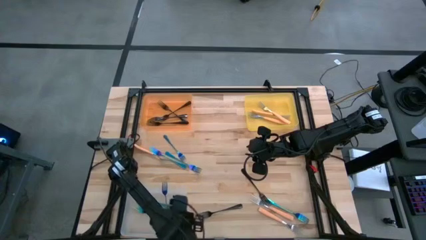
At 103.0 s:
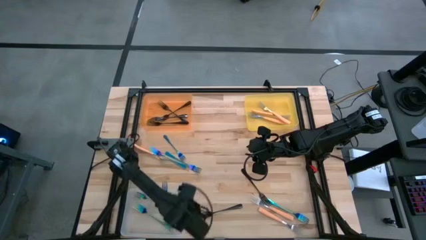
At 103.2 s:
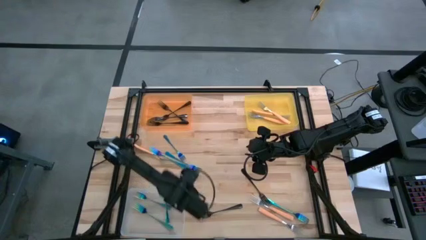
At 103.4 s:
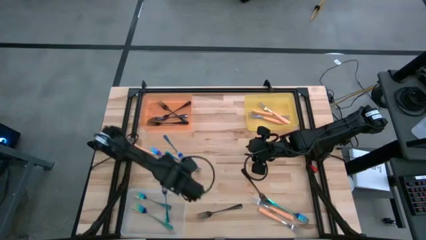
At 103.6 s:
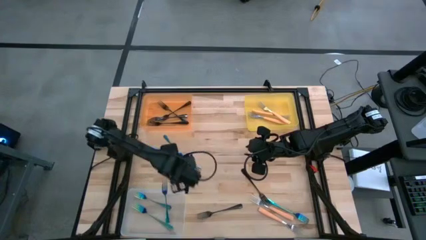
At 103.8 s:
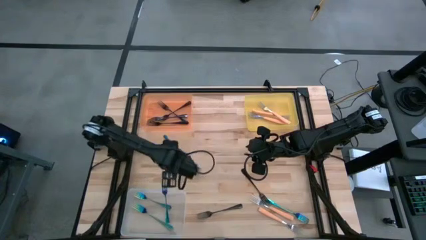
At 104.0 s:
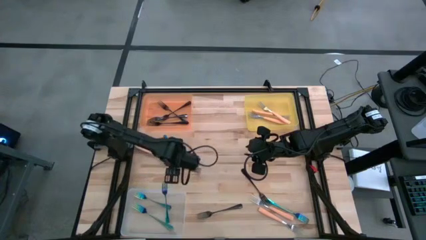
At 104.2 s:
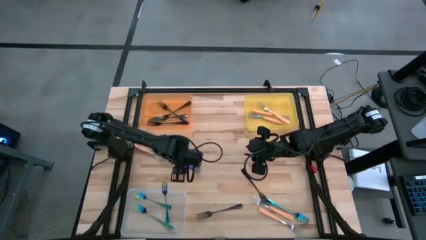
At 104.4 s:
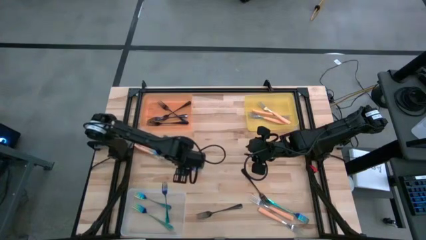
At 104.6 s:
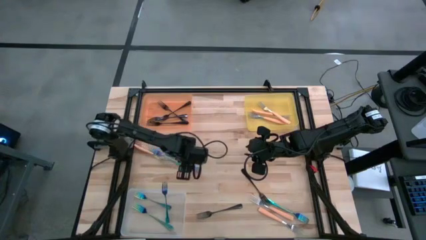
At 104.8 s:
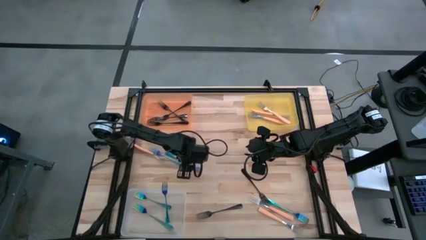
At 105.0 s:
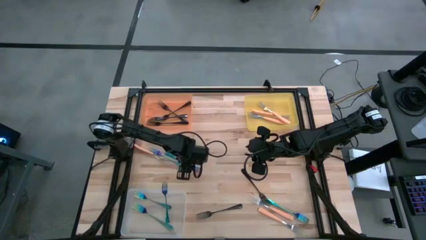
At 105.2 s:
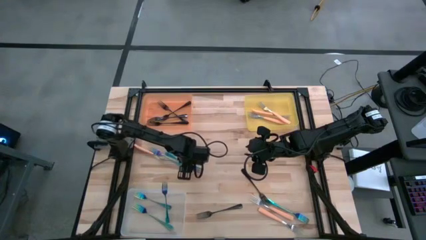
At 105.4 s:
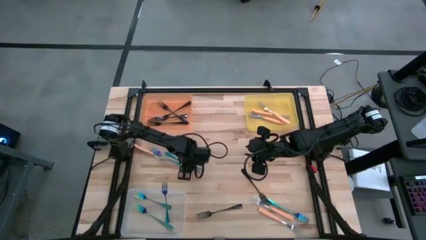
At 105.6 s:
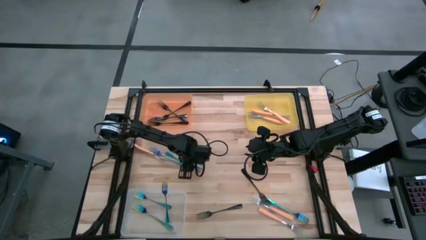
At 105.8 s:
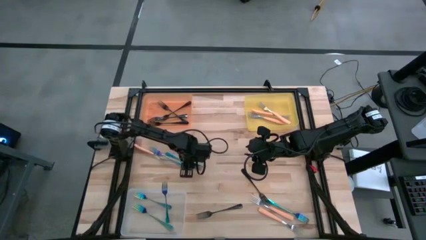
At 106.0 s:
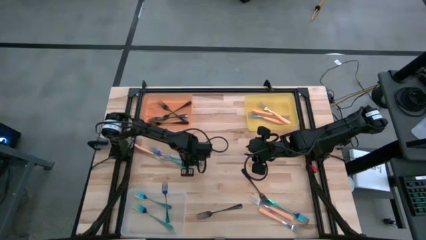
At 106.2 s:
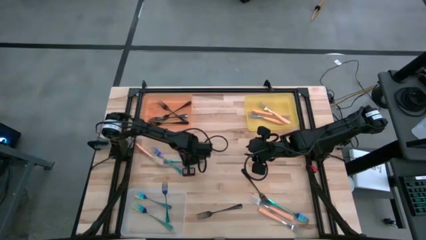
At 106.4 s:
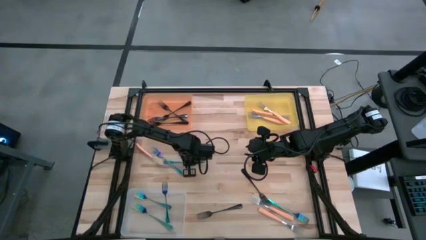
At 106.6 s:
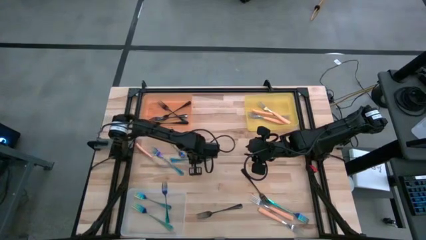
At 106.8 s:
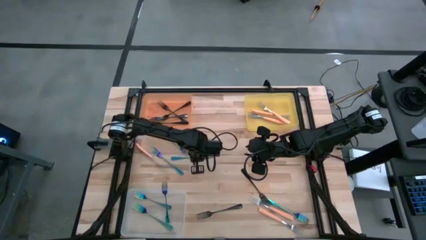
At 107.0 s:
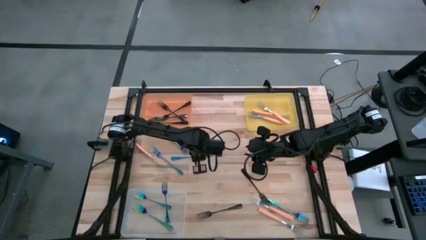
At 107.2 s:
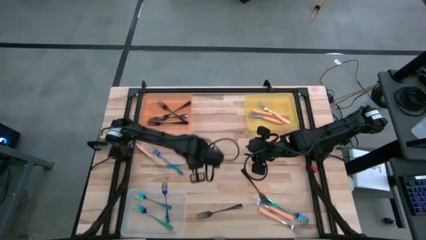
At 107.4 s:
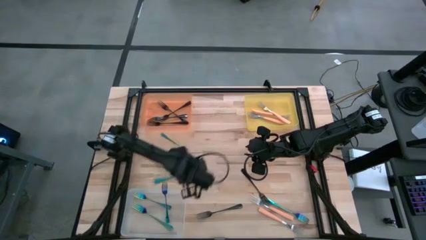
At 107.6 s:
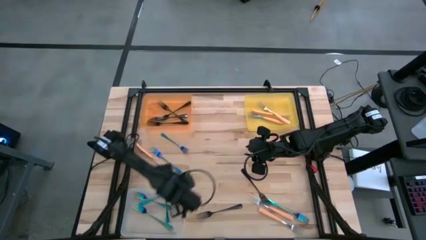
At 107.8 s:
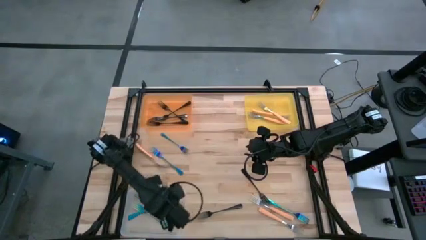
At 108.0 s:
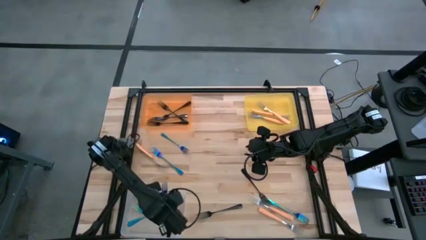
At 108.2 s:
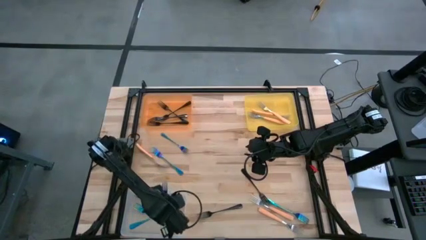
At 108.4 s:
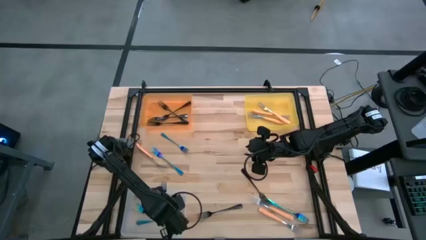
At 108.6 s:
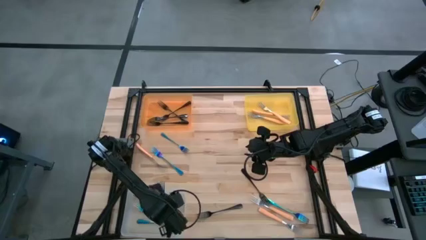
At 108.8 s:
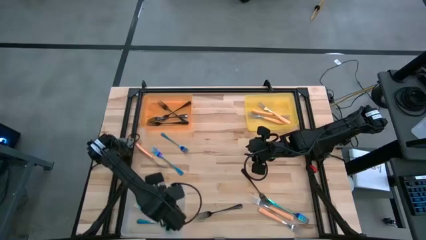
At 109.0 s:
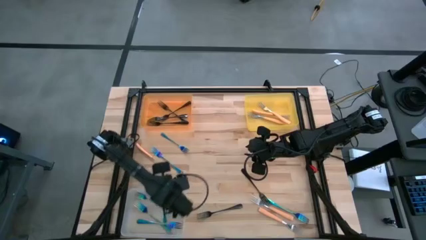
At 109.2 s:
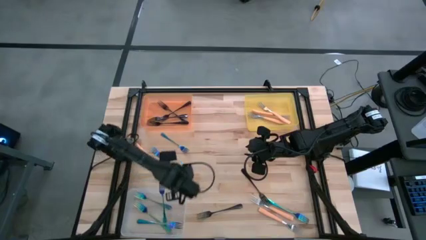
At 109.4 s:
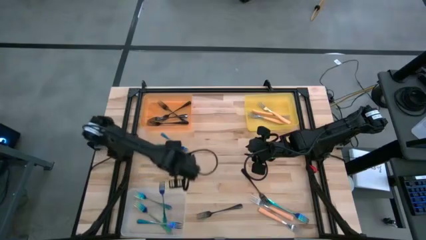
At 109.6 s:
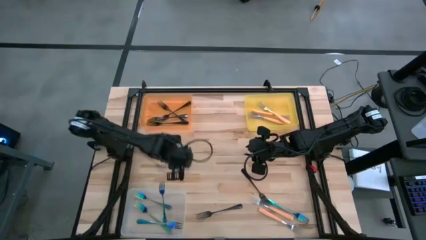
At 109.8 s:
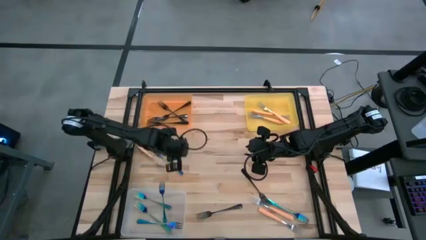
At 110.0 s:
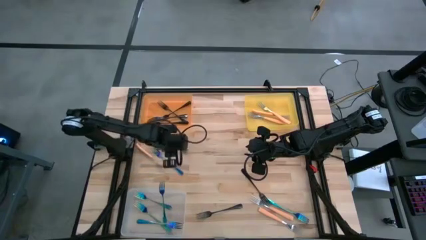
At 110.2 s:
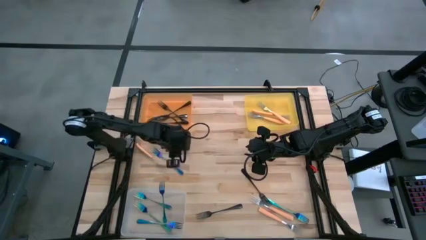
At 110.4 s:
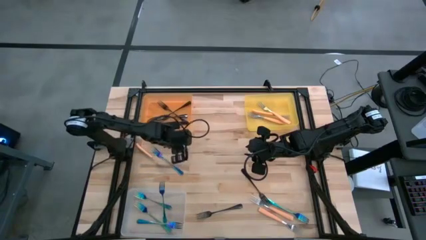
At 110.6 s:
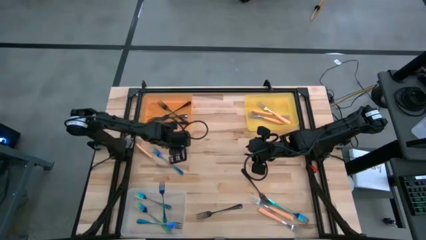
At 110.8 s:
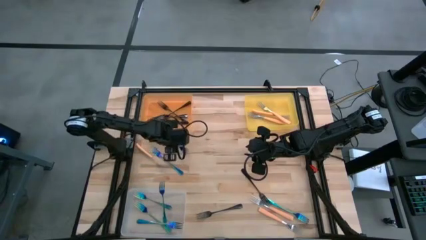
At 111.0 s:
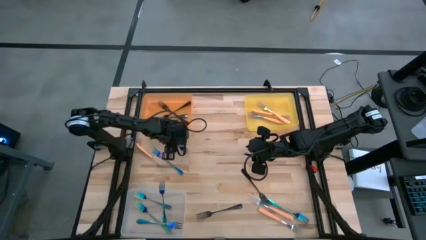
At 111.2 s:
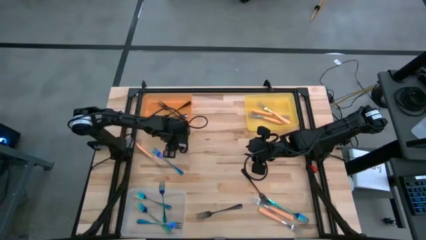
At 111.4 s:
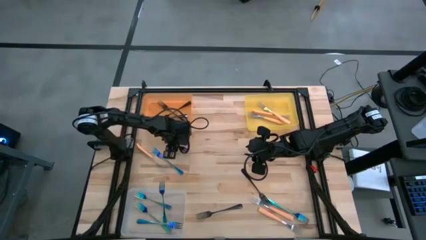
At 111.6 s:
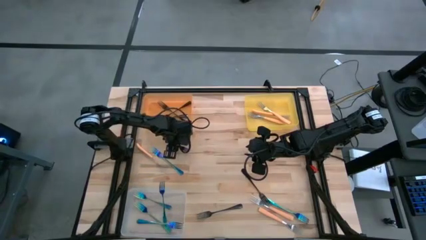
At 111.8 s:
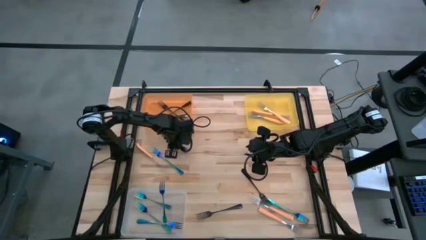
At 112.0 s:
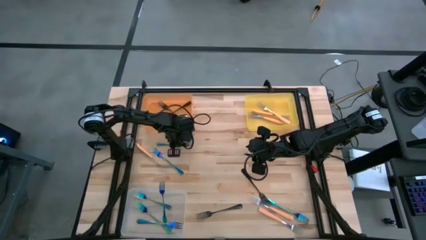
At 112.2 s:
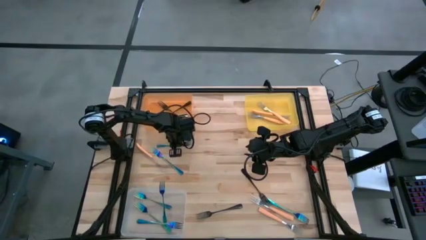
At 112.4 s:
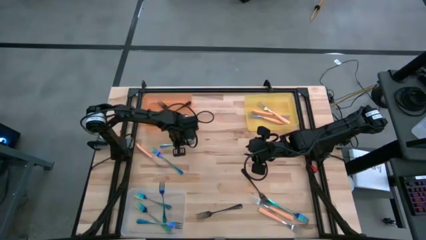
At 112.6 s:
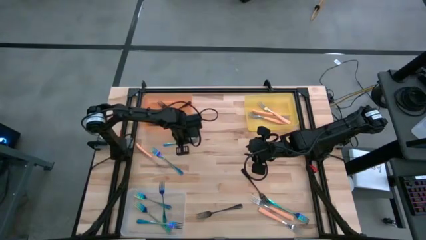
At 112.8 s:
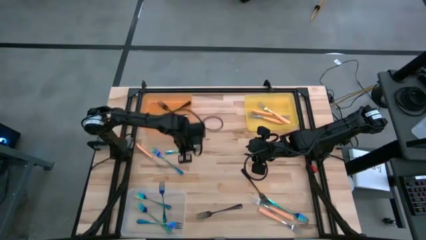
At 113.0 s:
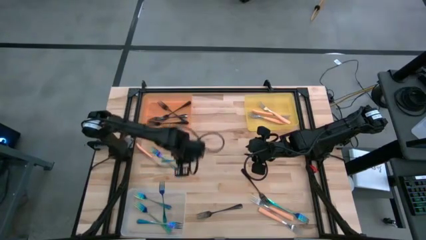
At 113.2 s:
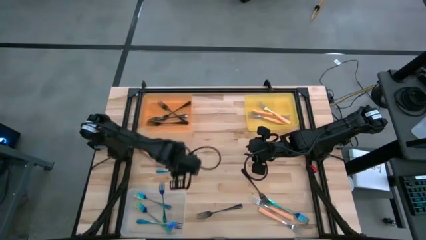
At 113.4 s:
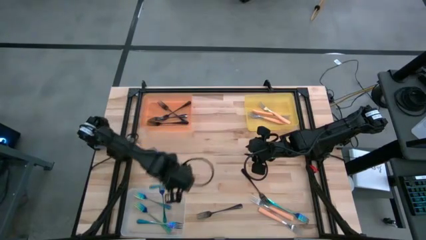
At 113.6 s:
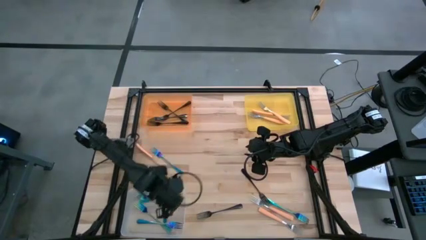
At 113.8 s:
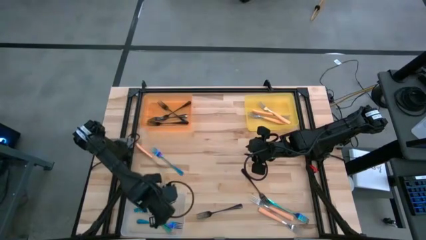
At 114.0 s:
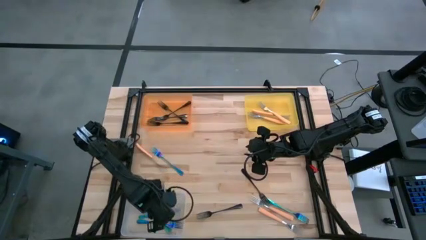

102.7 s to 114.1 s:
Task: Sort silverware by color (type)
Put the blue fork into the transparent bin

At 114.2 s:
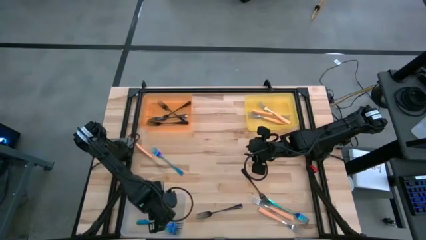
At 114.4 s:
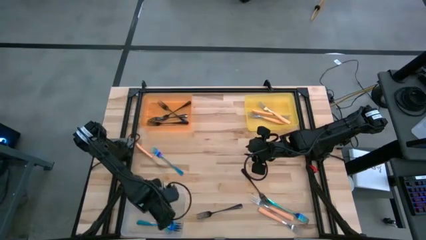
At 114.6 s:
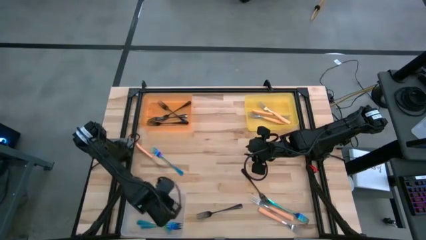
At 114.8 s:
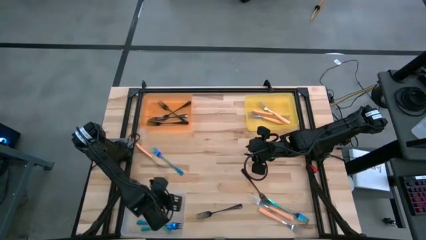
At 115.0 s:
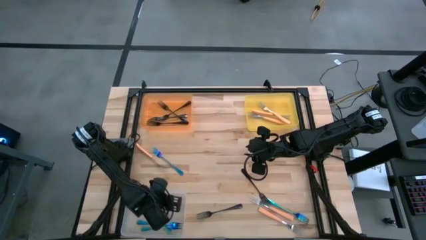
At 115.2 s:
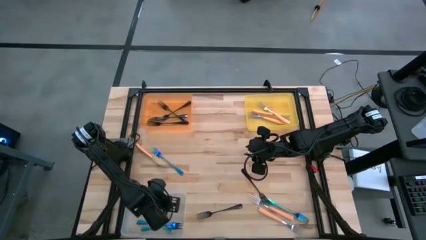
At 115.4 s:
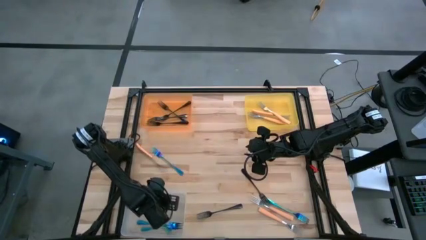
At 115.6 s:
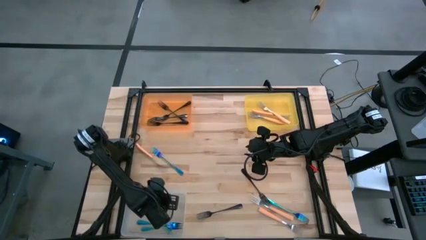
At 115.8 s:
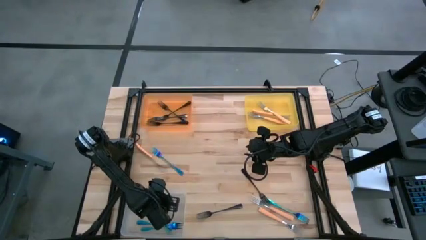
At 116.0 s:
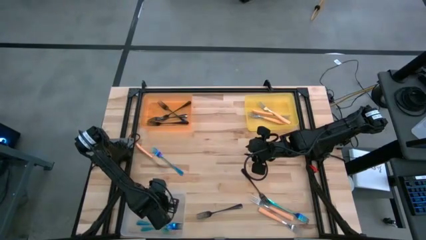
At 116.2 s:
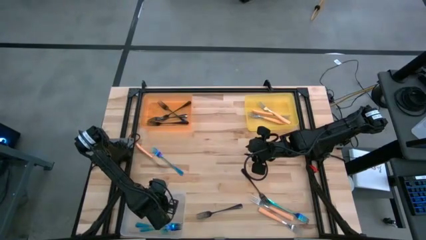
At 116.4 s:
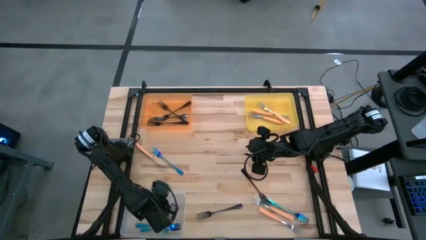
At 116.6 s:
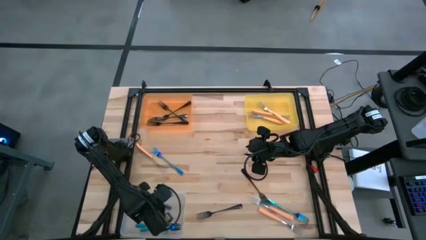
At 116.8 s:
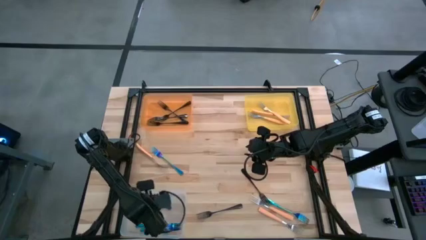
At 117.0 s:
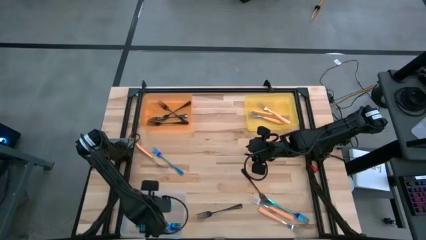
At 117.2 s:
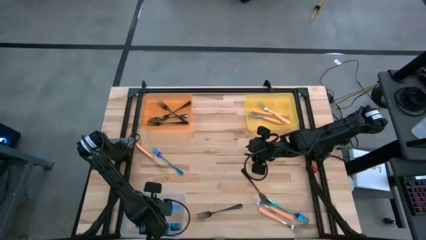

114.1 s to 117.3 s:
Adjust the blue fork on the transparent bin

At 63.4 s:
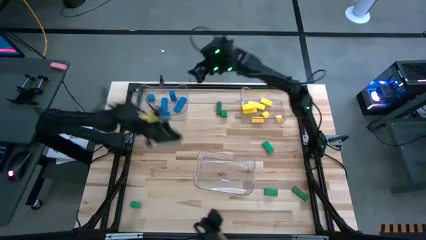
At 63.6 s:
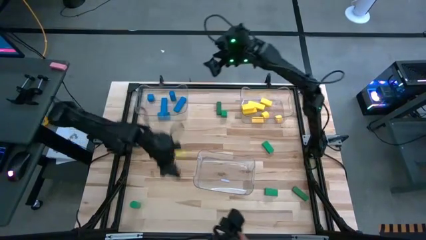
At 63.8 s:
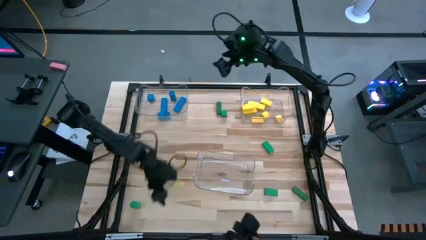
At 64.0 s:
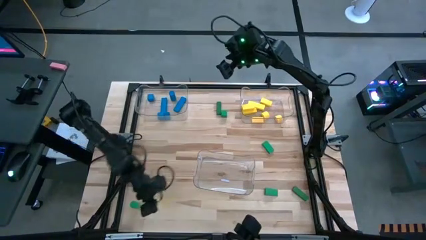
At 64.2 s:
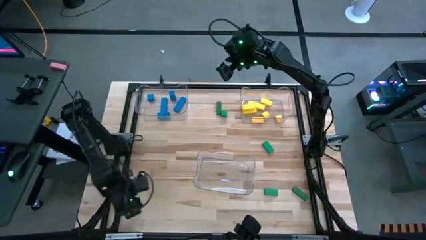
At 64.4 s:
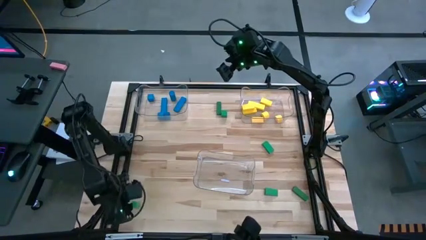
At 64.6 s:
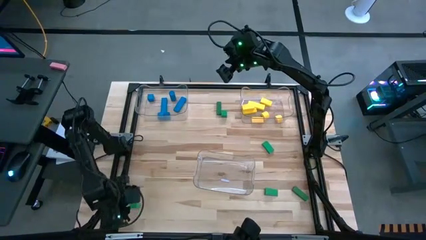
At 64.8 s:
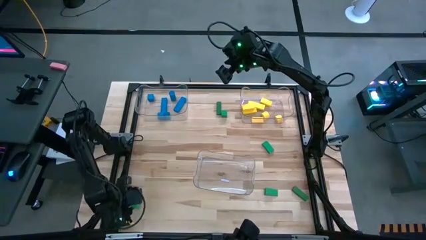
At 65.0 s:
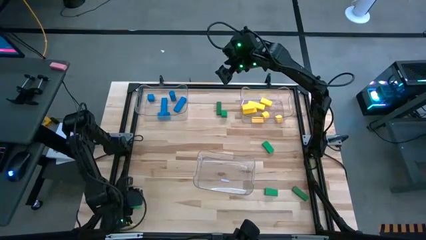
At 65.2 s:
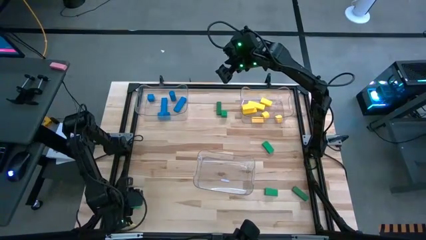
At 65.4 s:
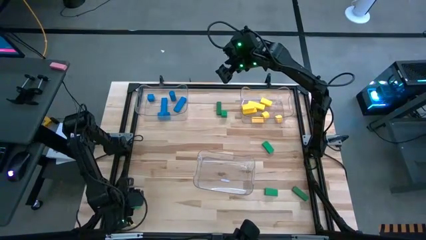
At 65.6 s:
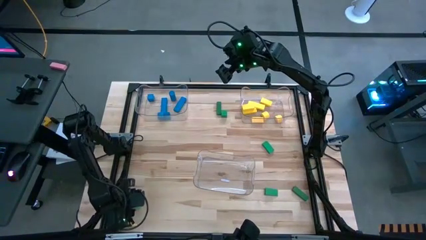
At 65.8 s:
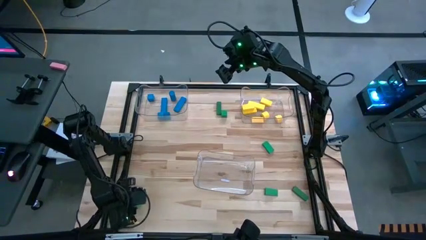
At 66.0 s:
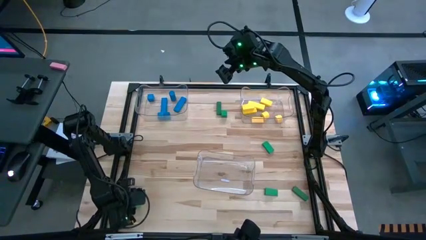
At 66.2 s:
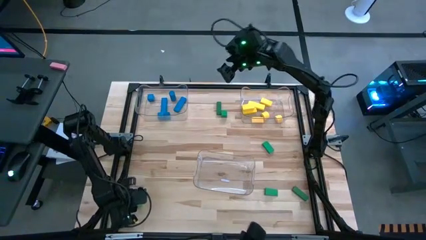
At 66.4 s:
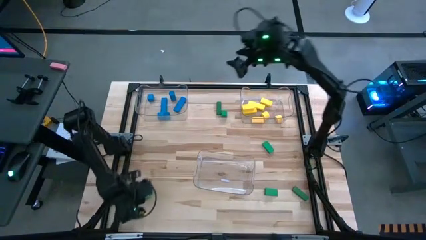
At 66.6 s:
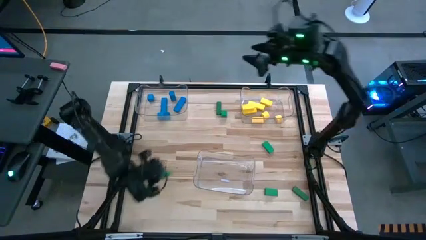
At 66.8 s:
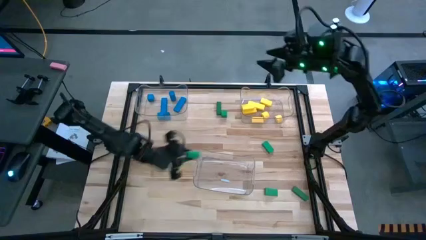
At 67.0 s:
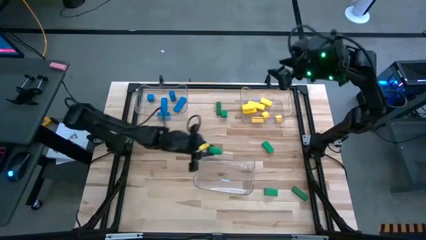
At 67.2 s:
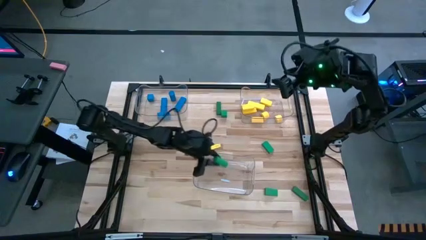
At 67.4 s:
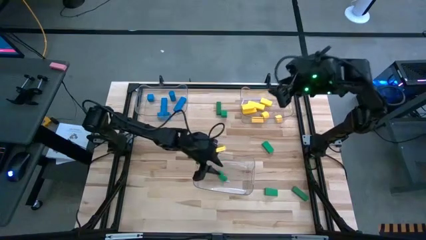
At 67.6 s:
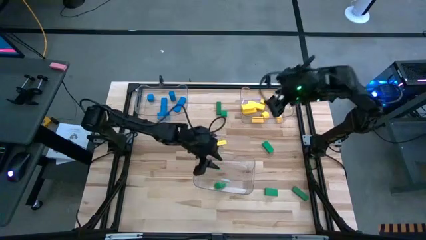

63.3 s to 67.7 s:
Task: Sort blocks
Put the green block into the bottom transparent bin
